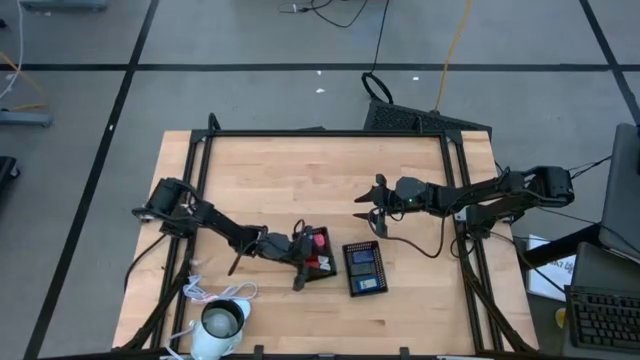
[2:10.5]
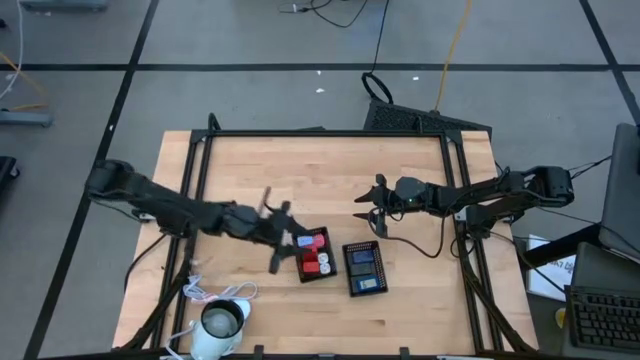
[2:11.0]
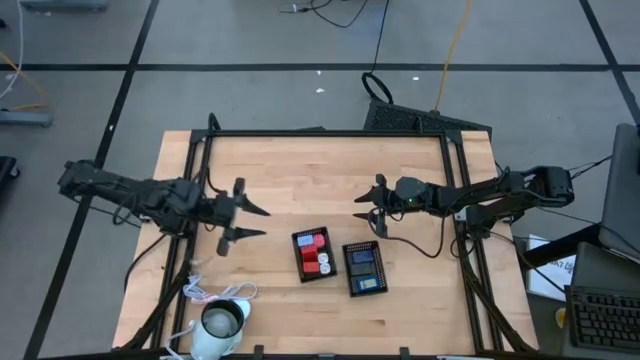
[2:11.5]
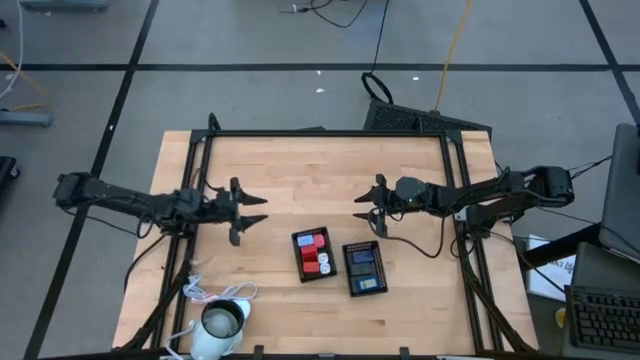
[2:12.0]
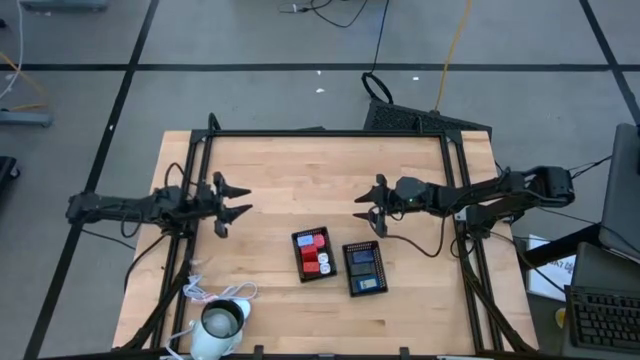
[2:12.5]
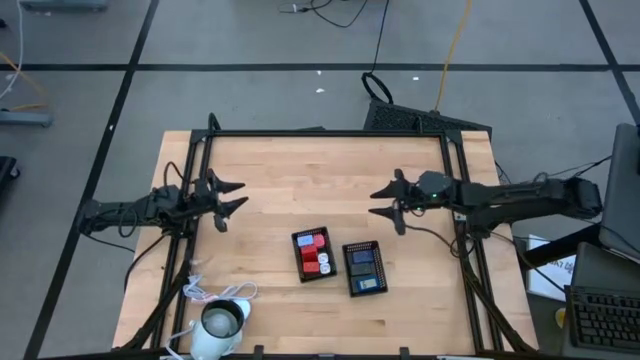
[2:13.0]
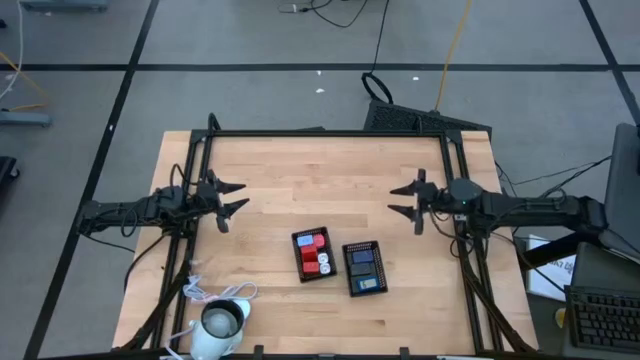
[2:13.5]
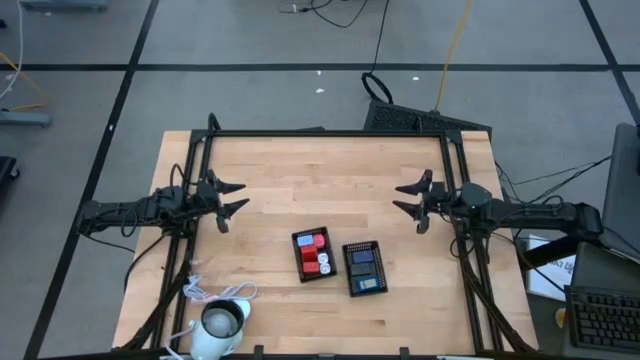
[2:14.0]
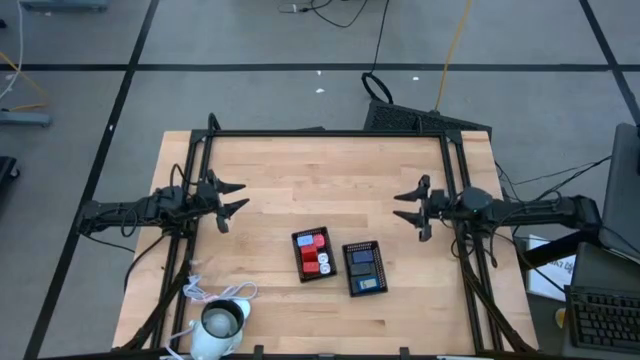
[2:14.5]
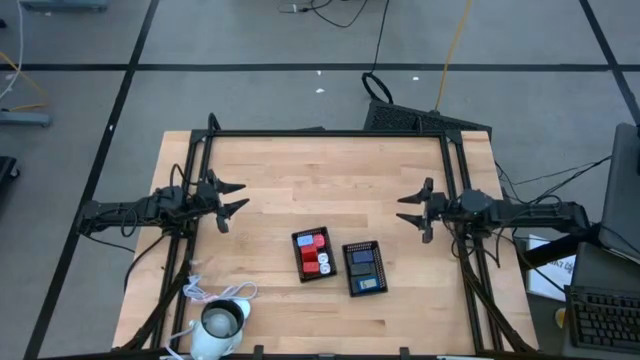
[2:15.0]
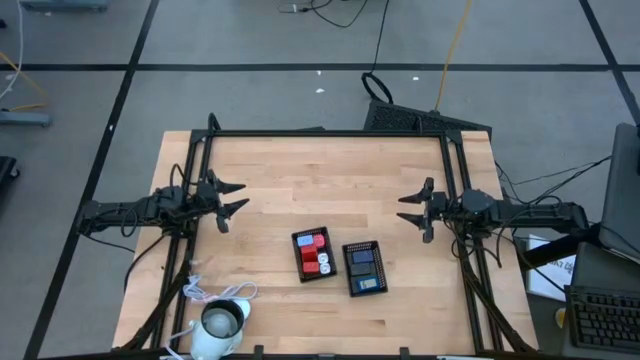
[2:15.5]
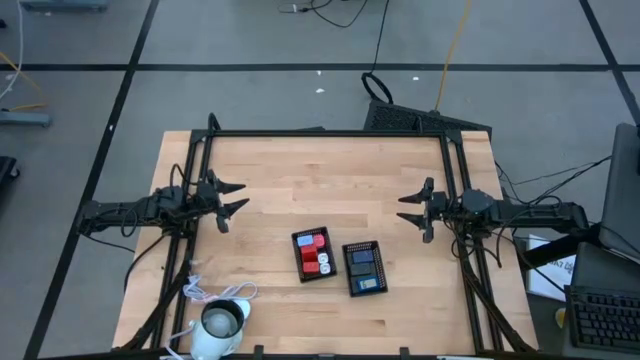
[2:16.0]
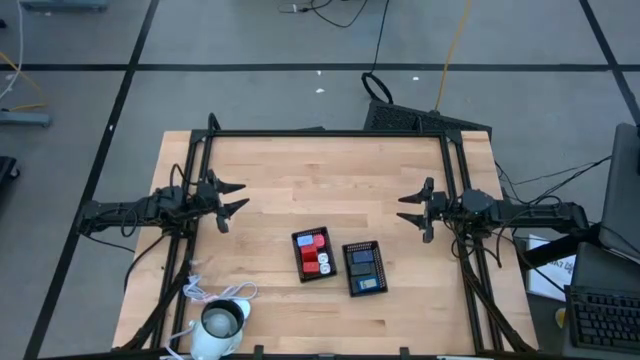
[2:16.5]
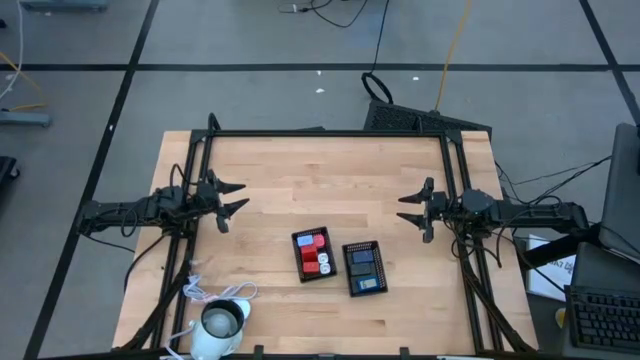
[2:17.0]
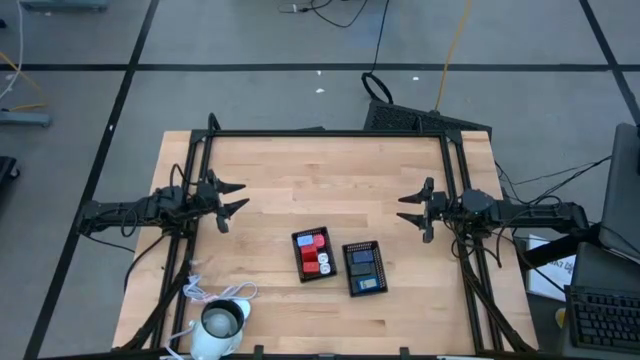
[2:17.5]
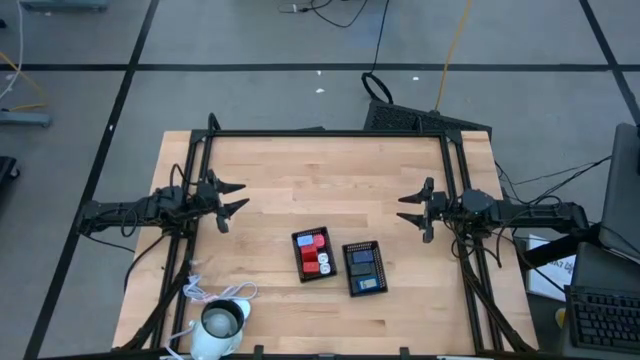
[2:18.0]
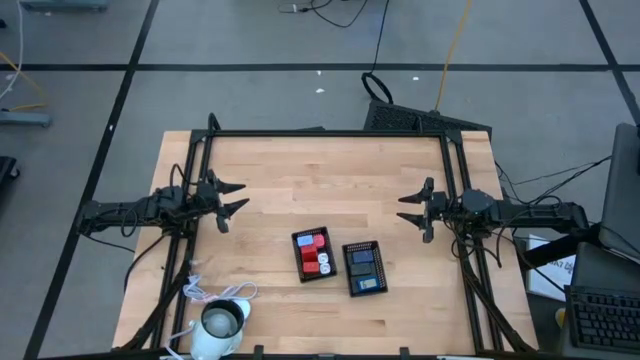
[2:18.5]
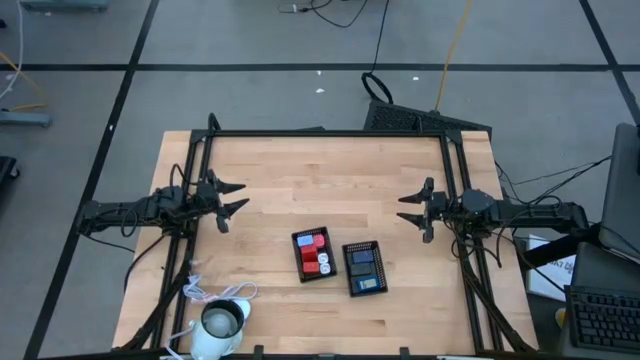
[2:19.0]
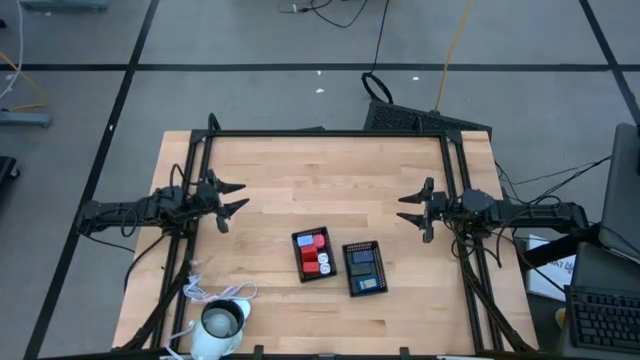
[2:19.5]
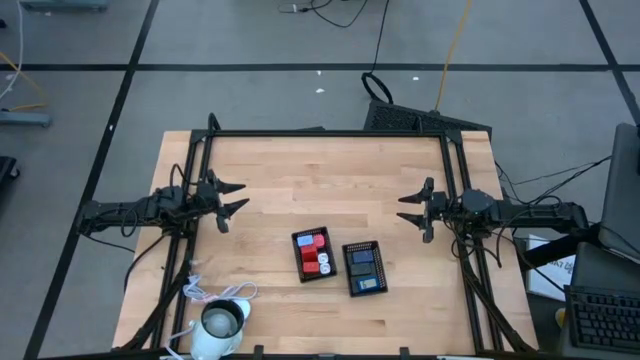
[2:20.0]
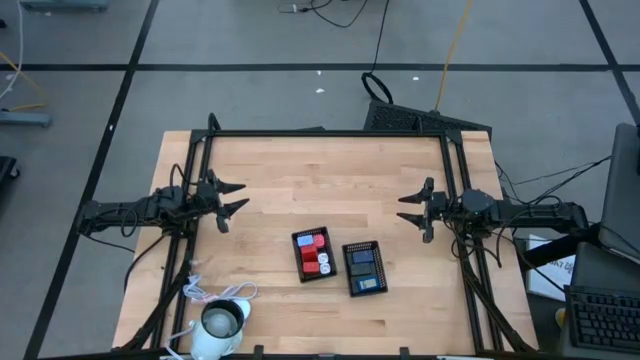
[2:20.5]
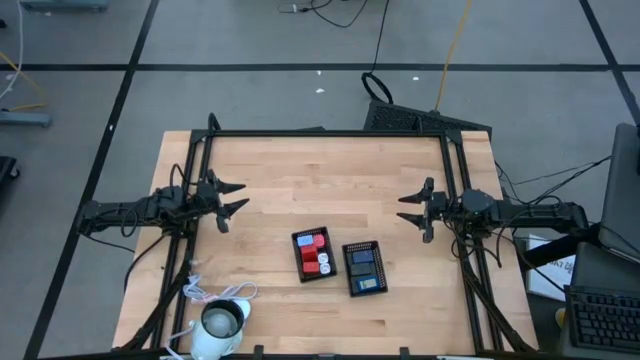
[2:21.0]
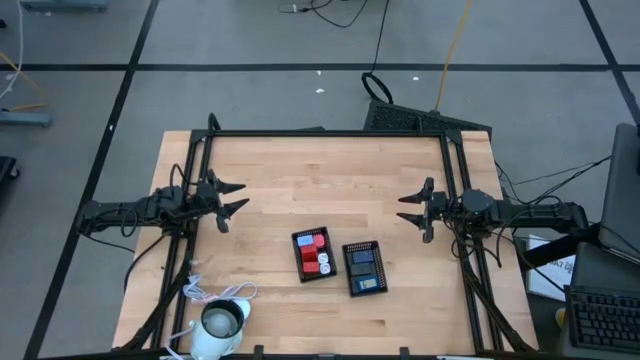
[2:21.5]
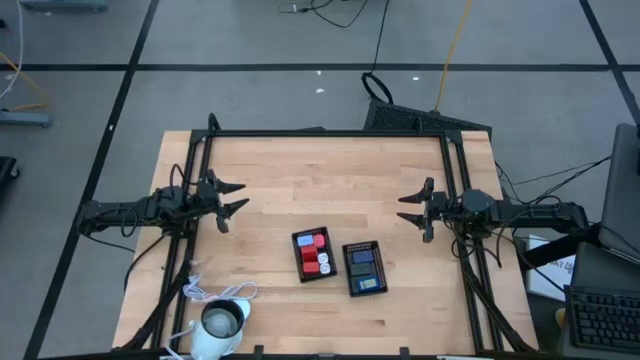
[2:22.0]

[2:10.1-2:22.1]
Task: Pick & Place Office items
Return to Home Position
